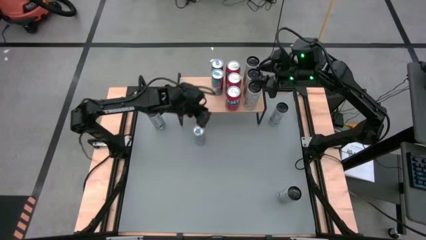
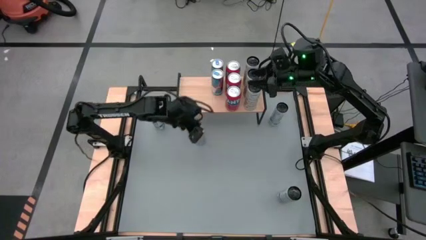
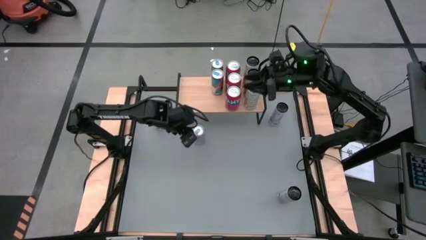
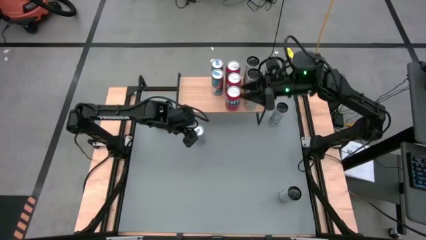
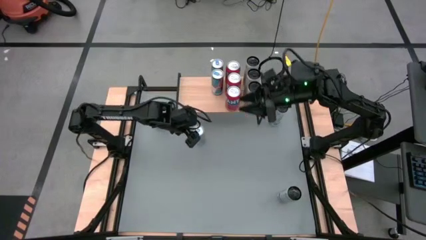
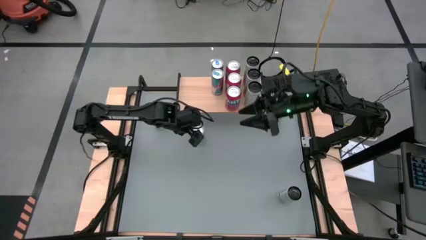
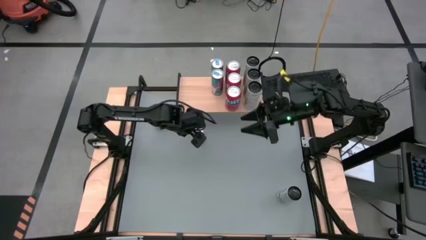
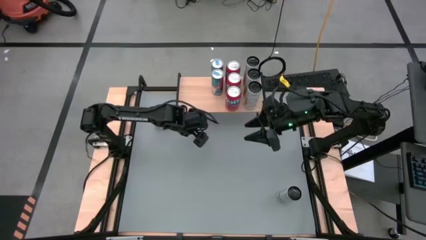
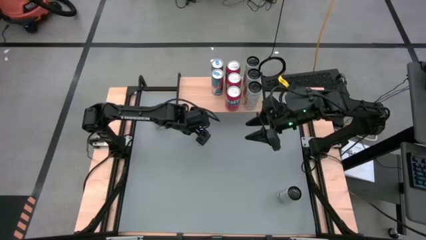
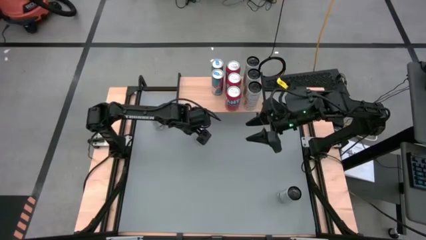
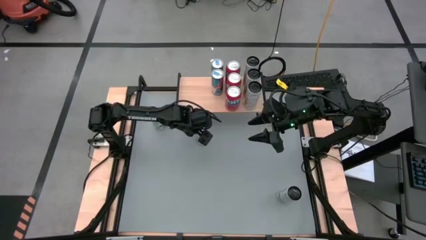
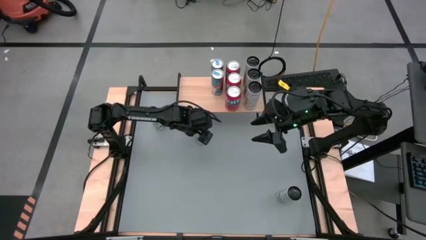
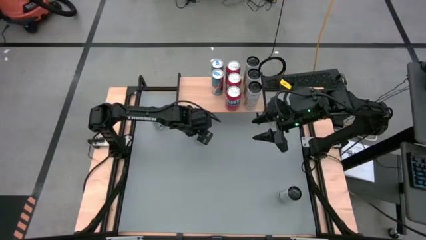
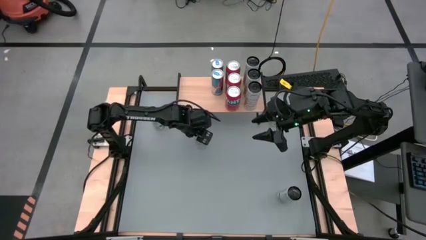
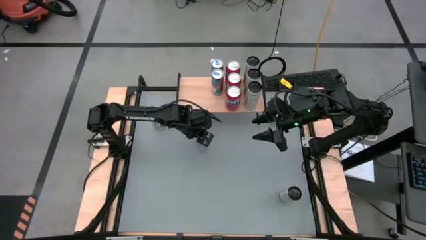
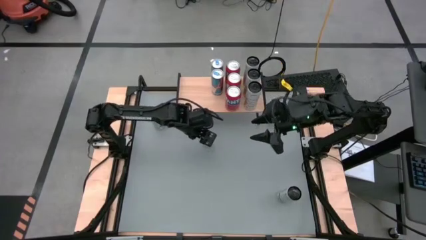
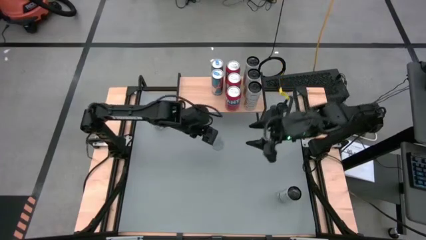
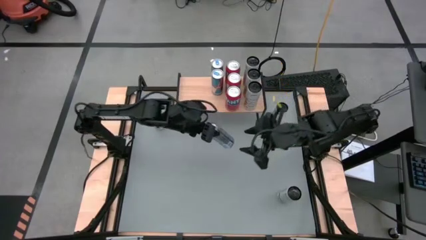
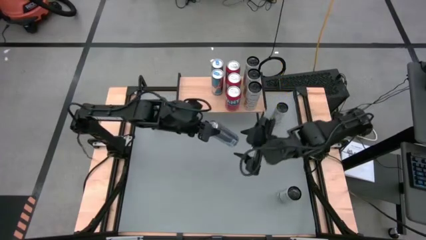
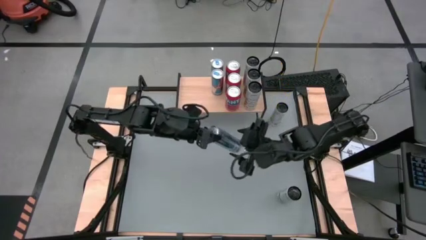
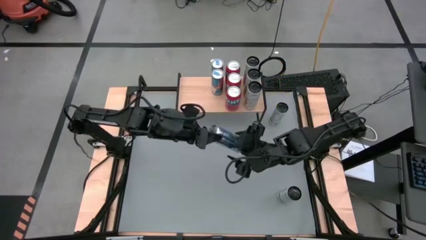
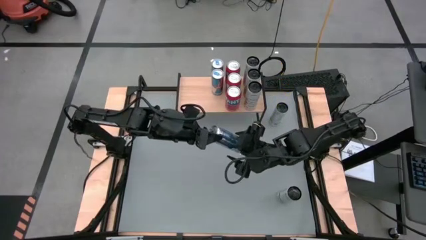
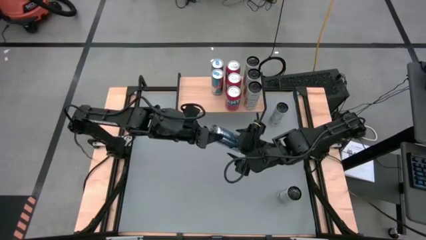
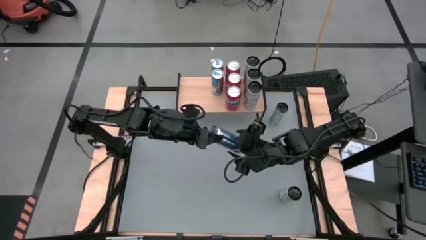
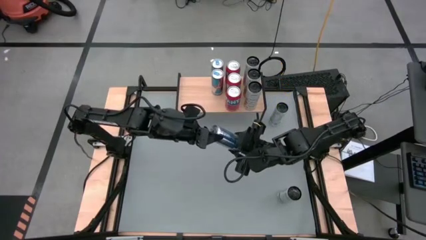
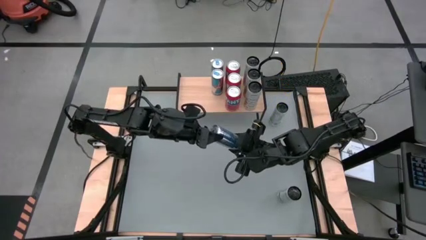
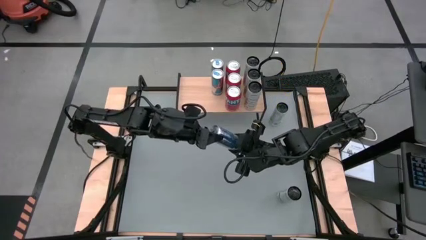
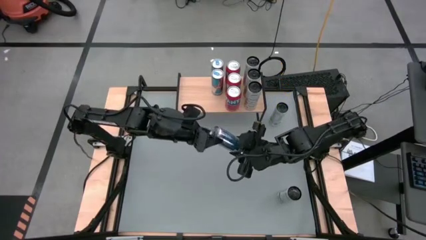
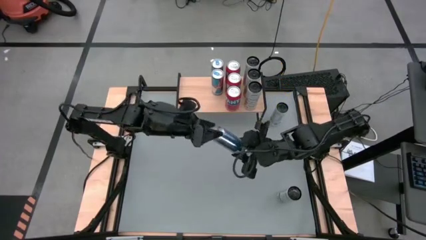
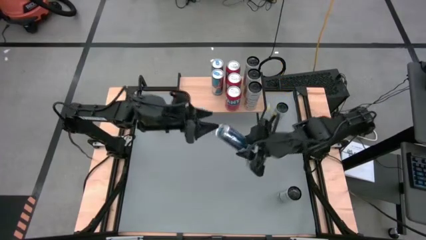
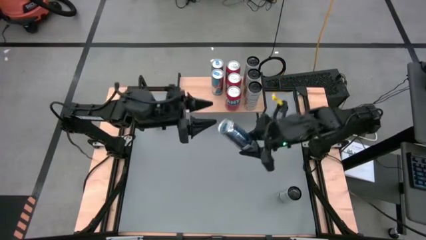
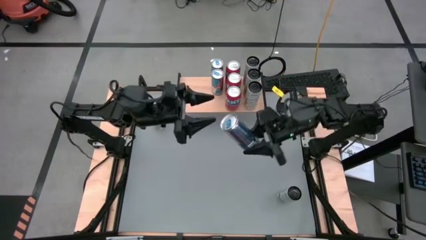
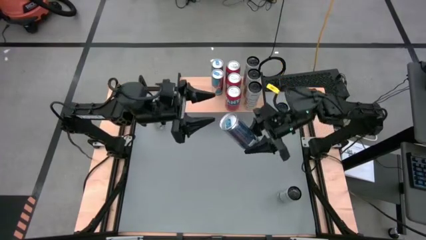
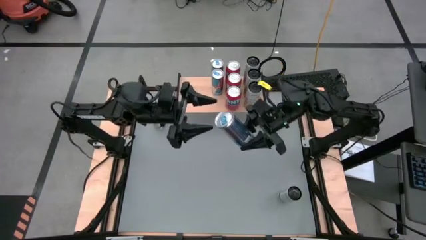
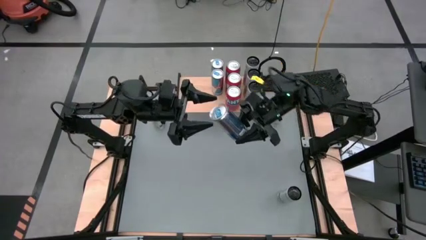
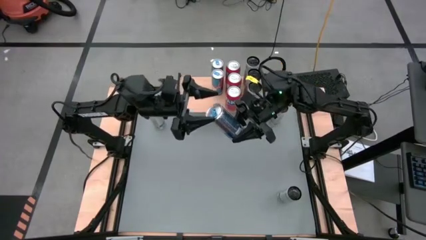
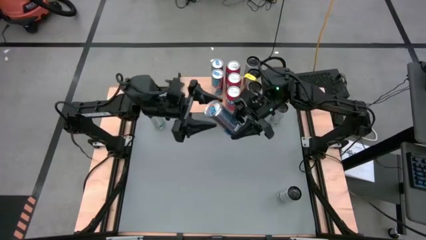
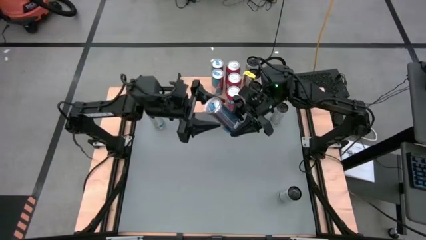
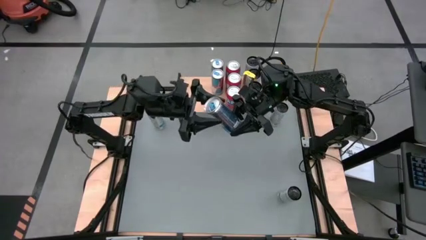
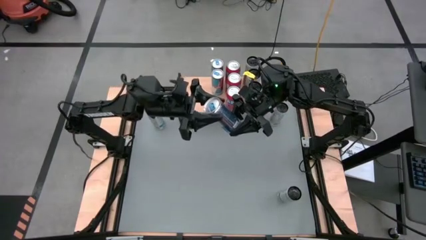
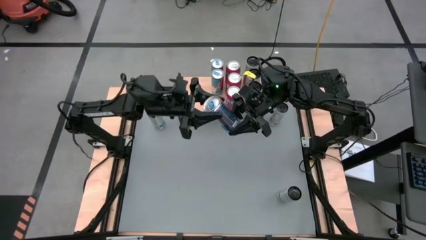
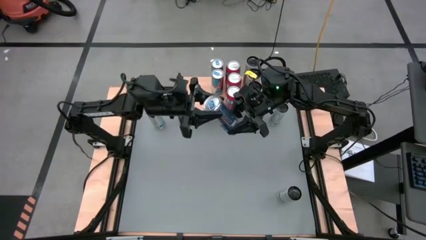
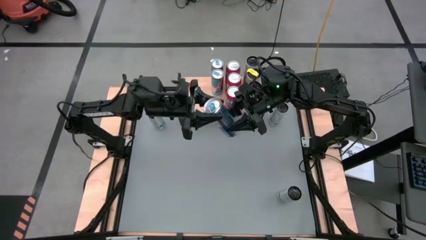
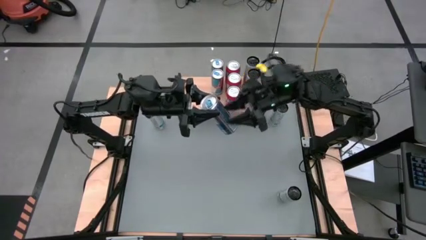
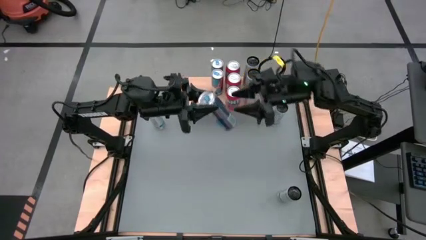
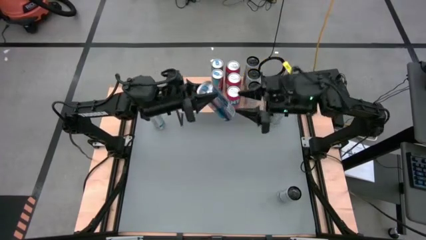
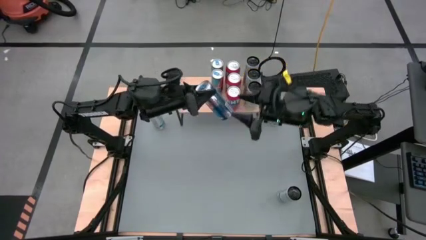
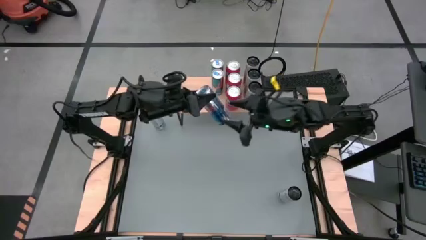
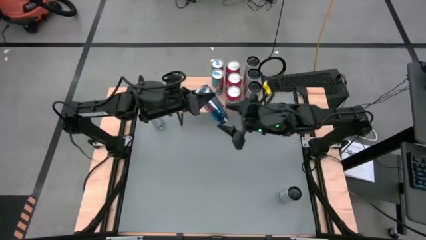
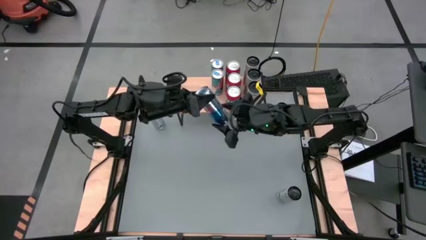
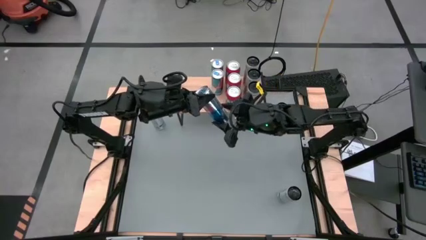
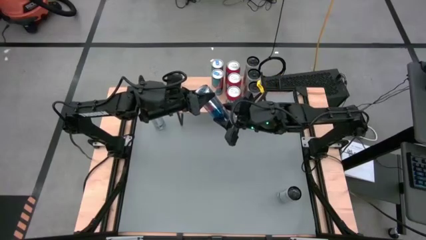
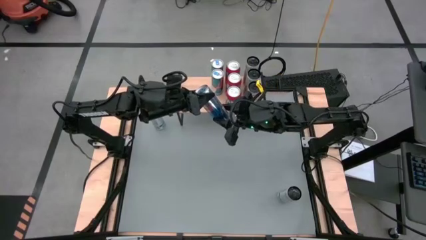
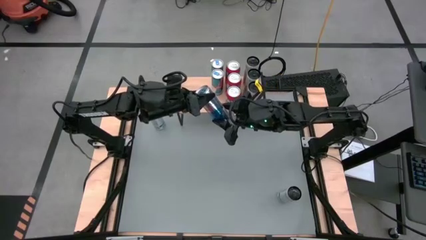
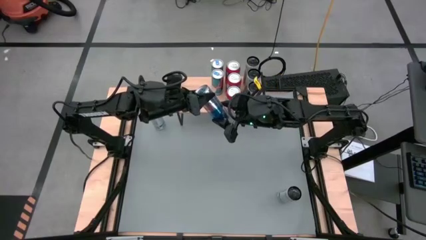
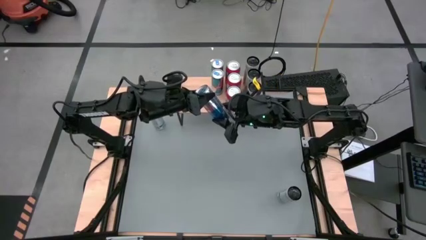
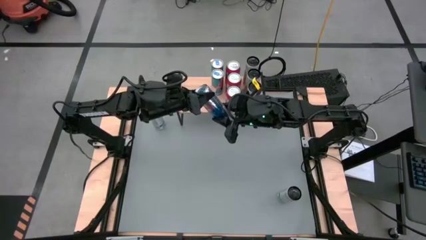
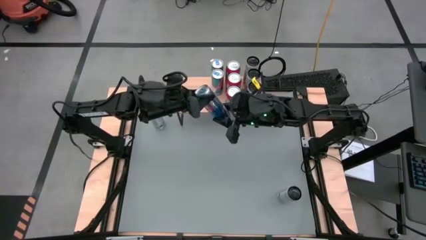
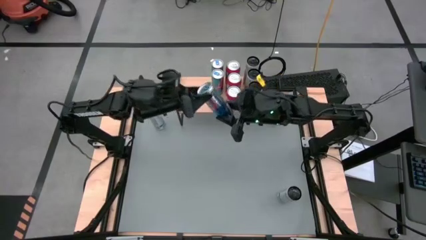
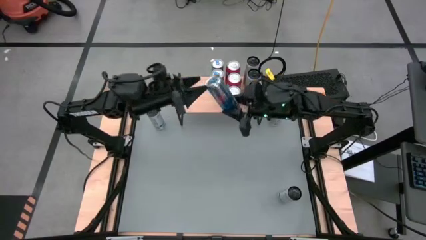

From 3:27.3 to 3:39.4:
Task: Place canned beverage on shelf
Put the blue can on the shelf aligned with the other blue can

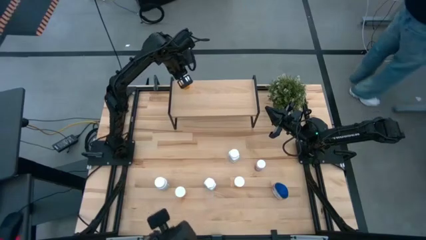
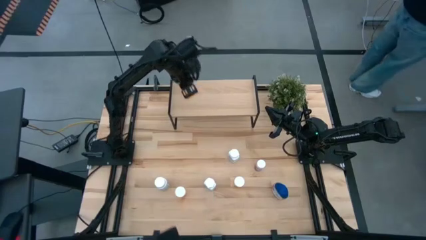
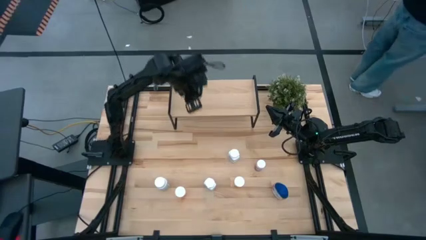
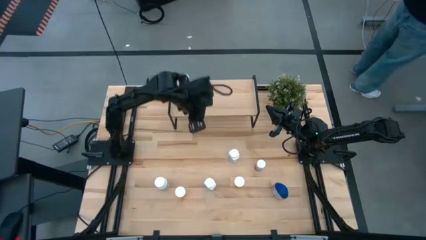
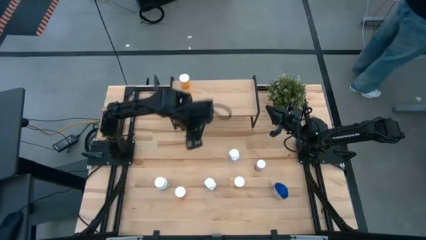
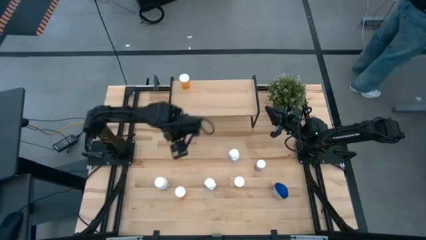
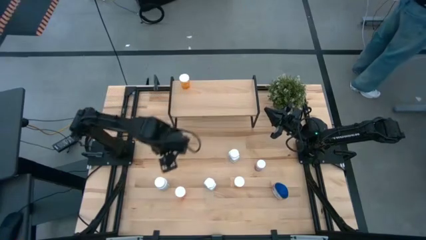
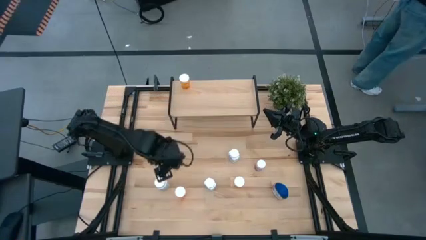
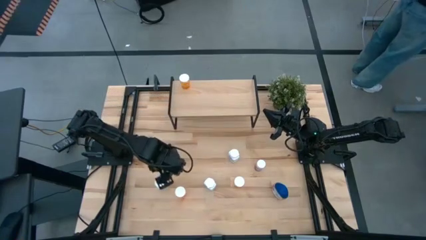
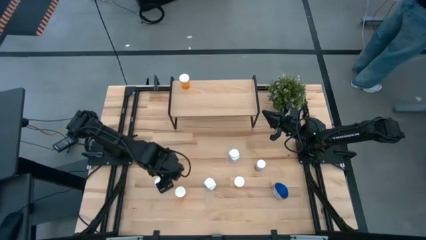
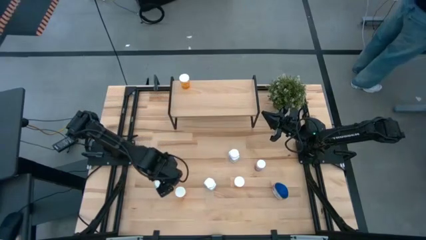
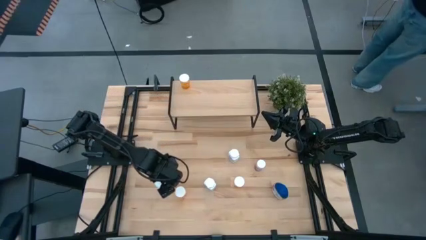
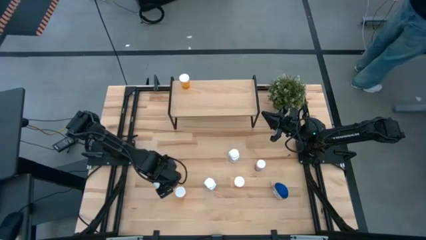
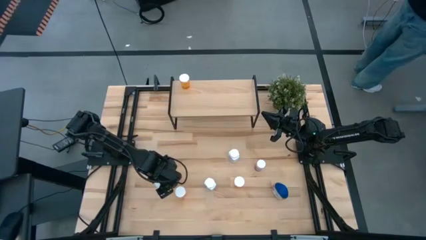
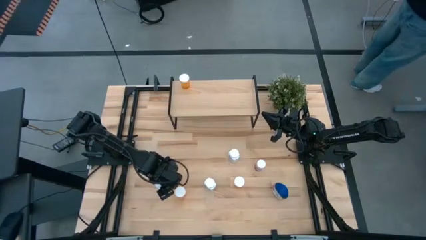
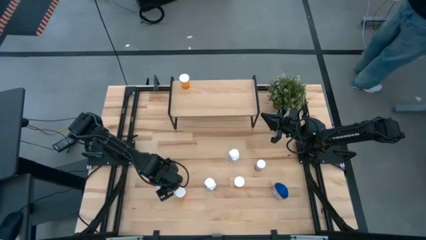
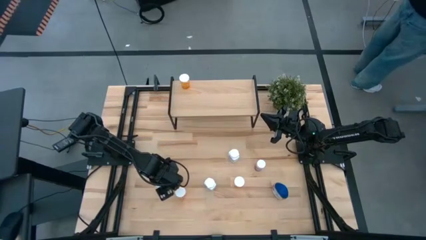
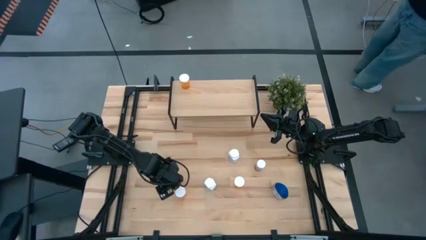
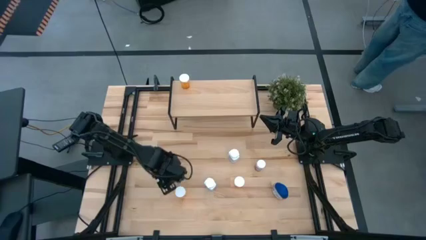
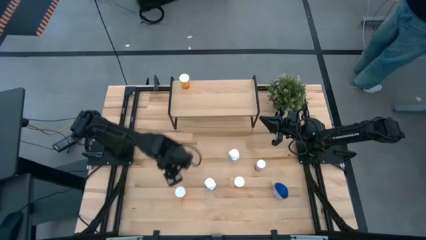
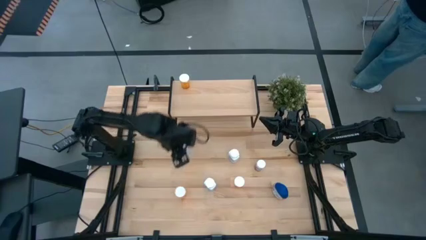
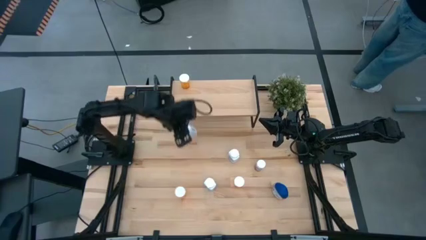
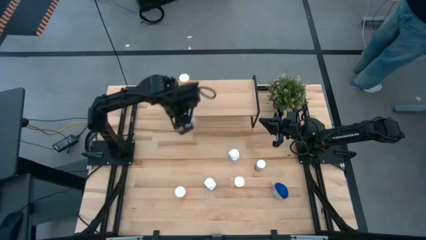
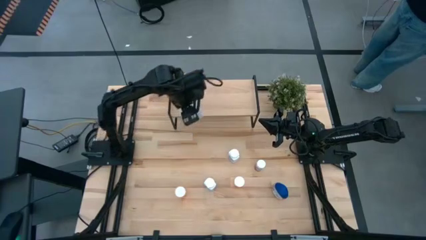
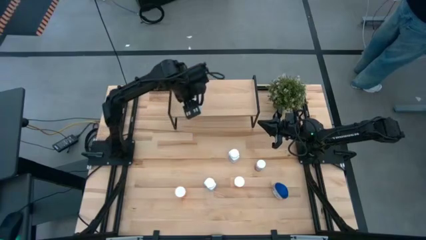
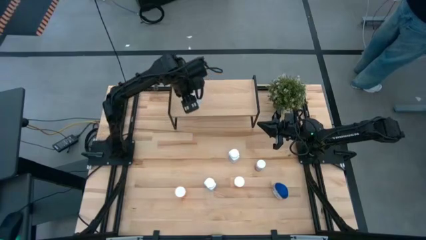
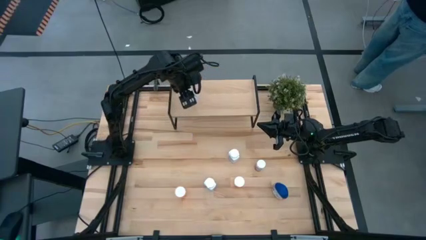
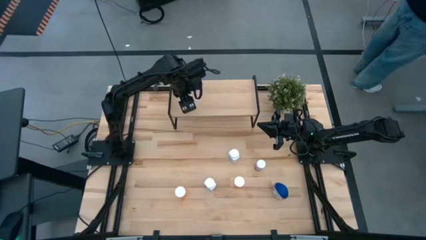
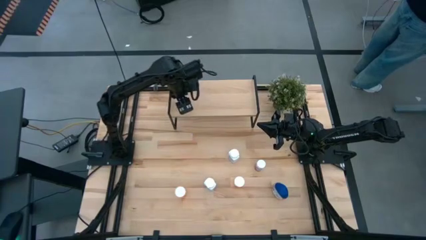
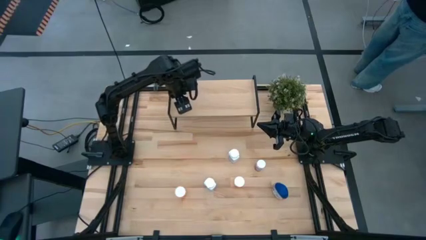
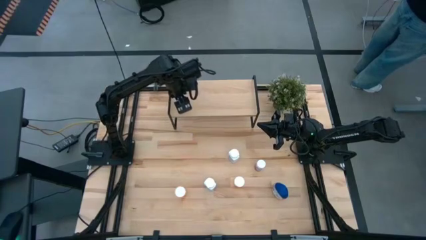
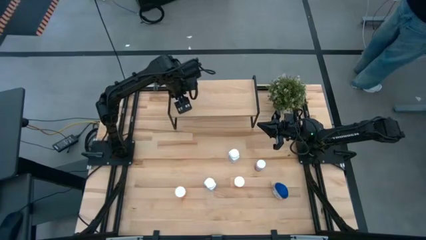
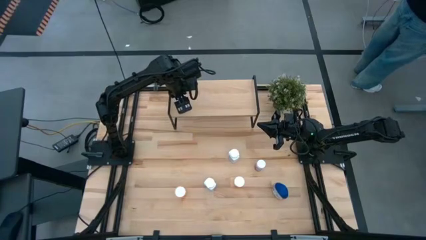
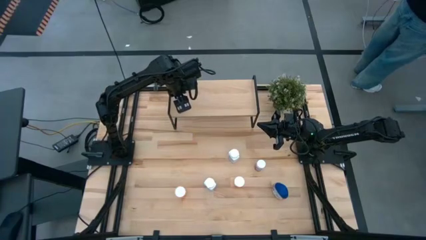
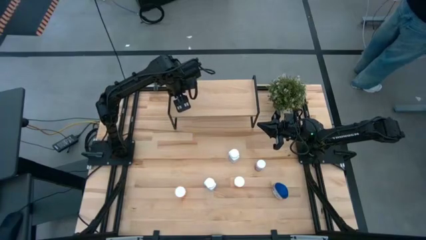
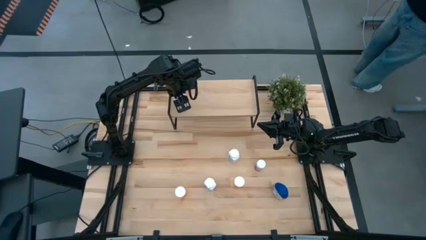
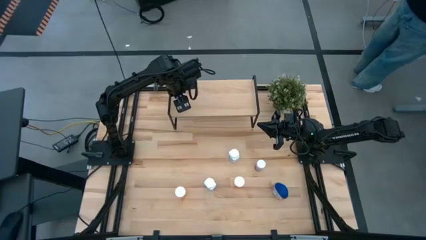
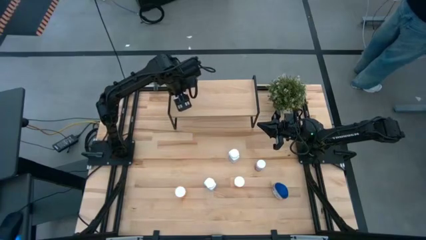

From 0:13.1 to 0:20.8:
Task: Pick and place medicine bottles onto shelf by color
Put the left white pill bottle on the shelf
